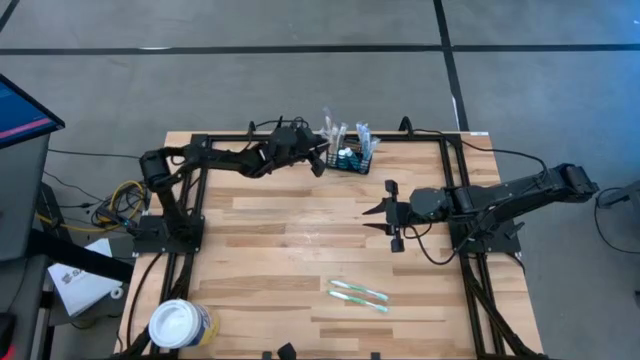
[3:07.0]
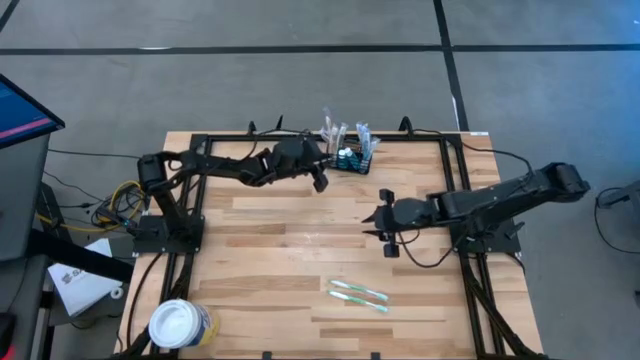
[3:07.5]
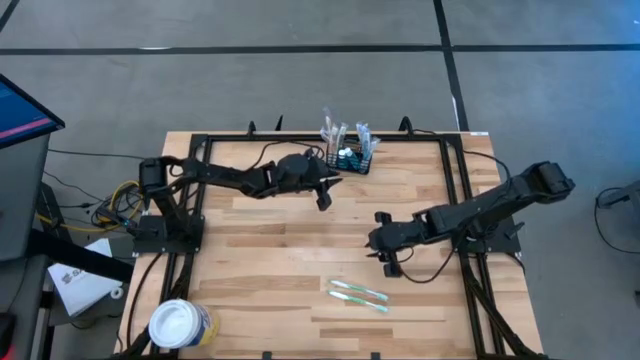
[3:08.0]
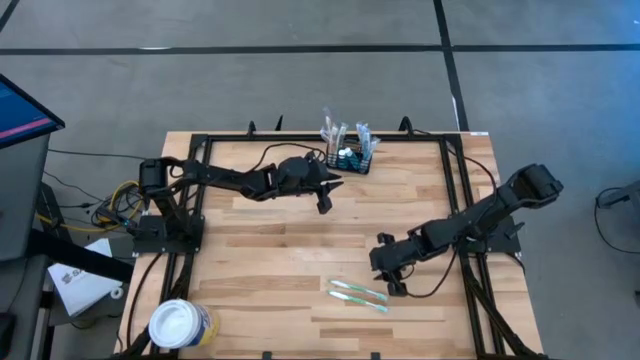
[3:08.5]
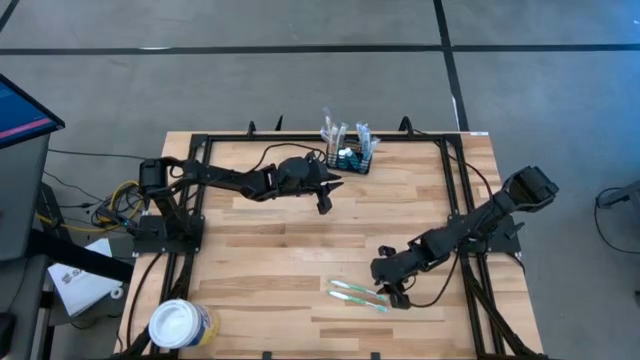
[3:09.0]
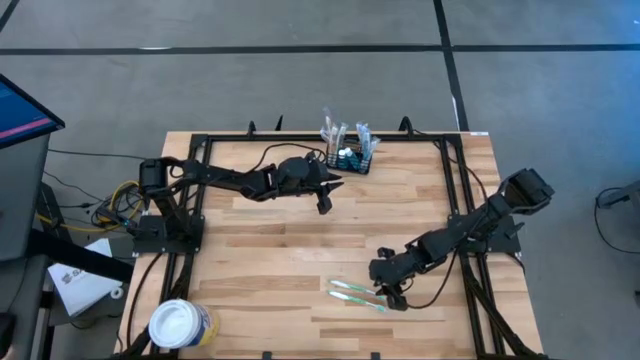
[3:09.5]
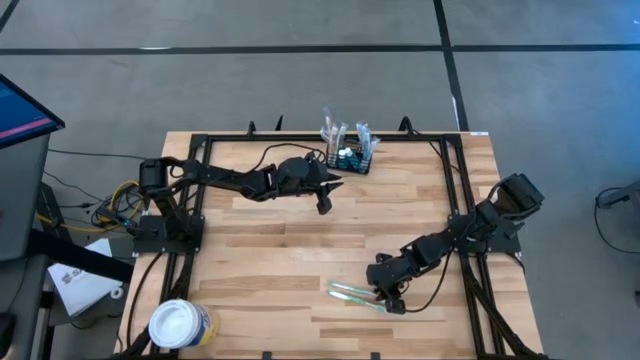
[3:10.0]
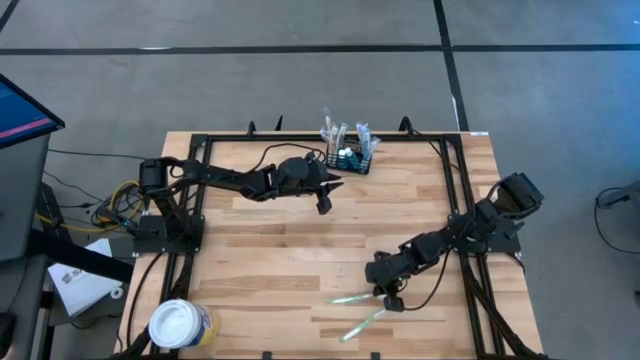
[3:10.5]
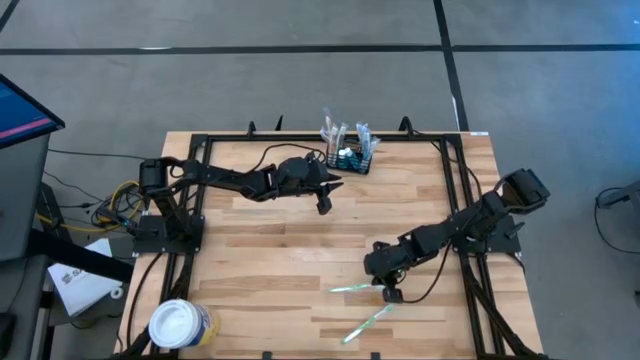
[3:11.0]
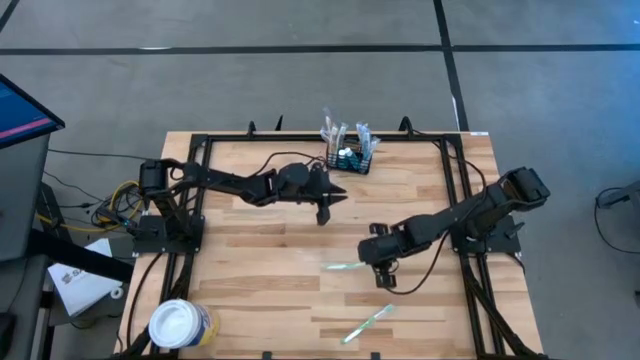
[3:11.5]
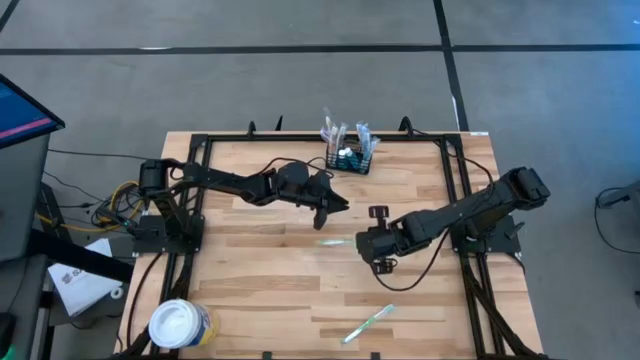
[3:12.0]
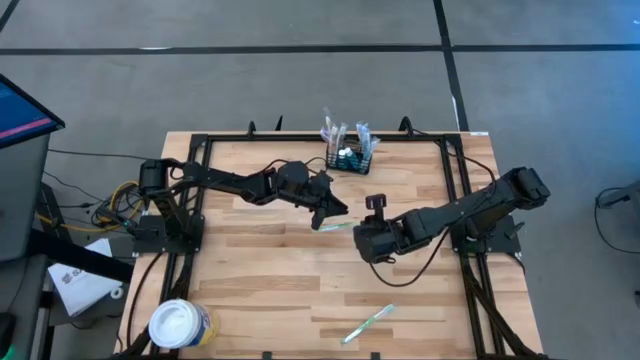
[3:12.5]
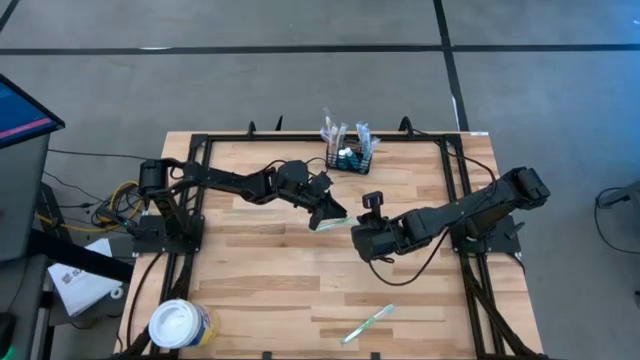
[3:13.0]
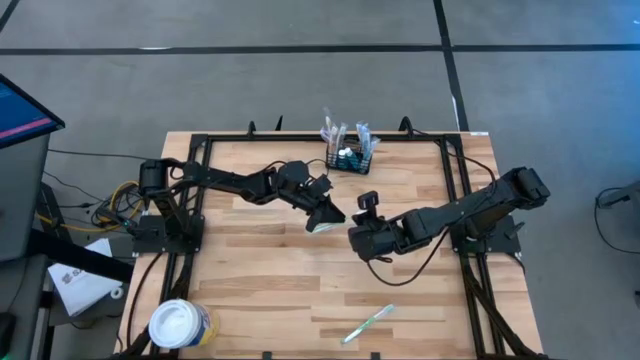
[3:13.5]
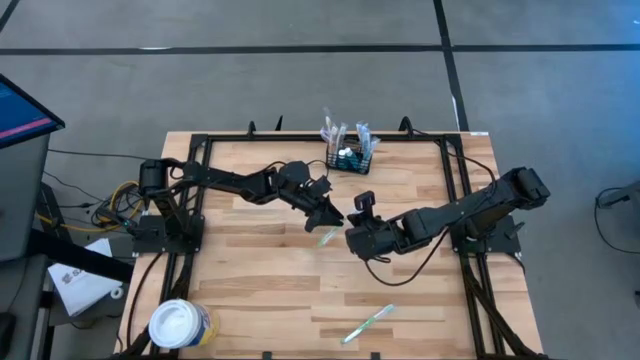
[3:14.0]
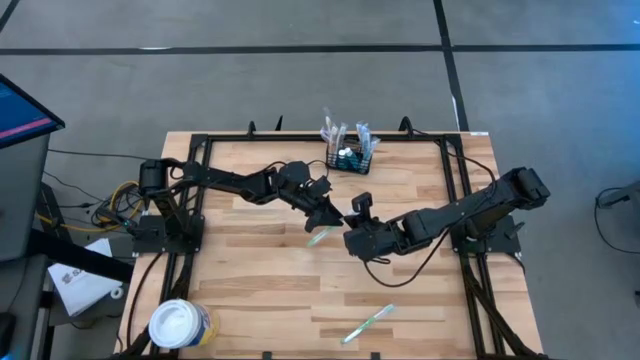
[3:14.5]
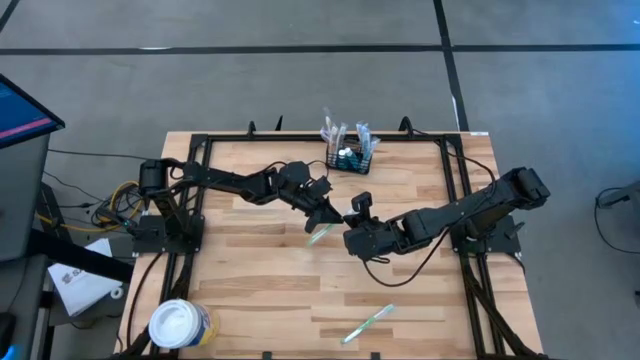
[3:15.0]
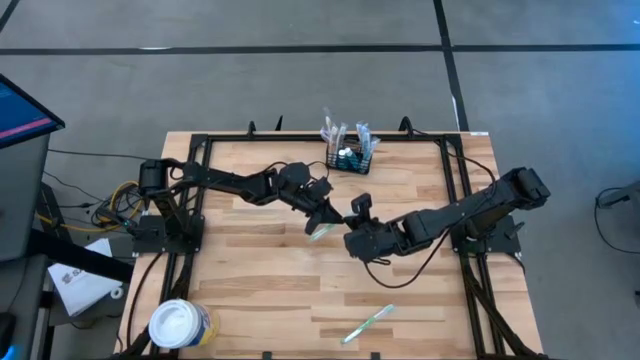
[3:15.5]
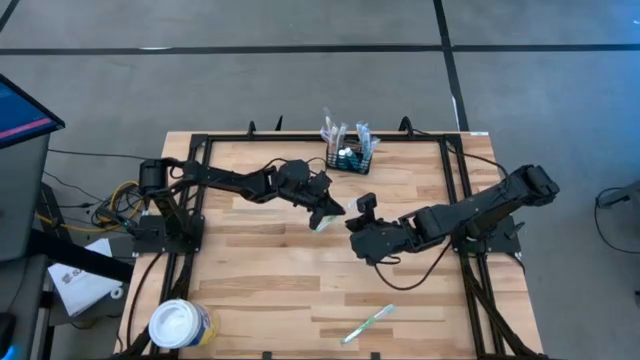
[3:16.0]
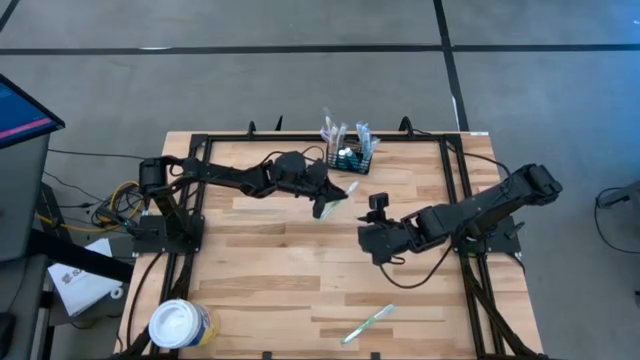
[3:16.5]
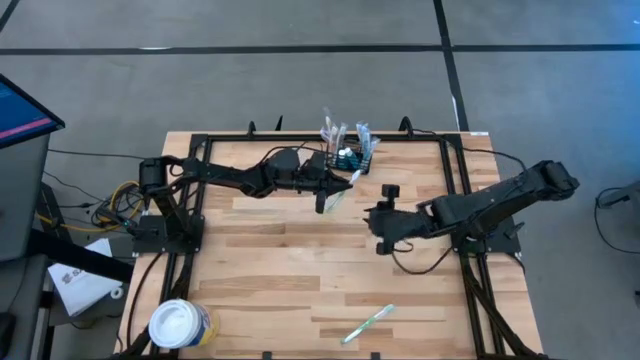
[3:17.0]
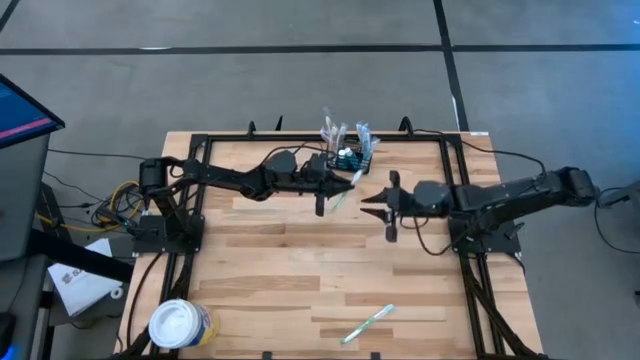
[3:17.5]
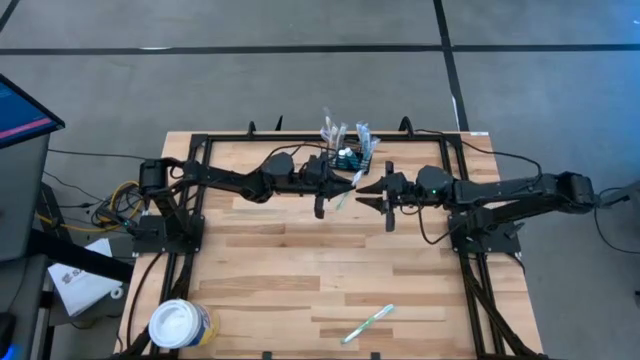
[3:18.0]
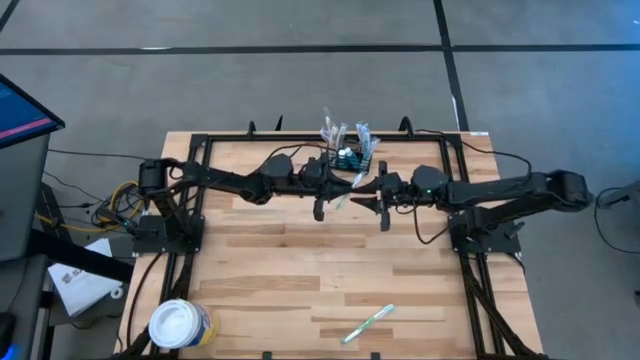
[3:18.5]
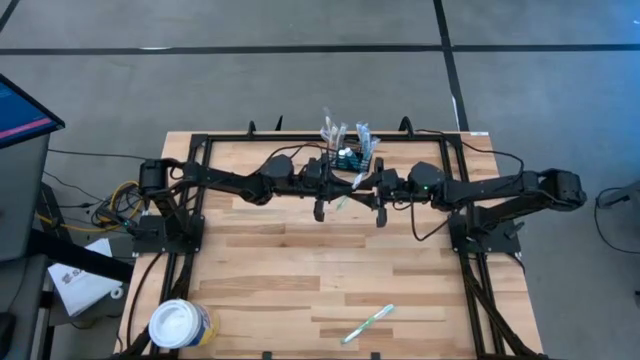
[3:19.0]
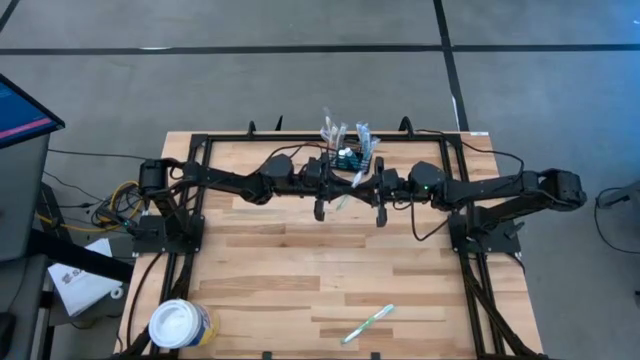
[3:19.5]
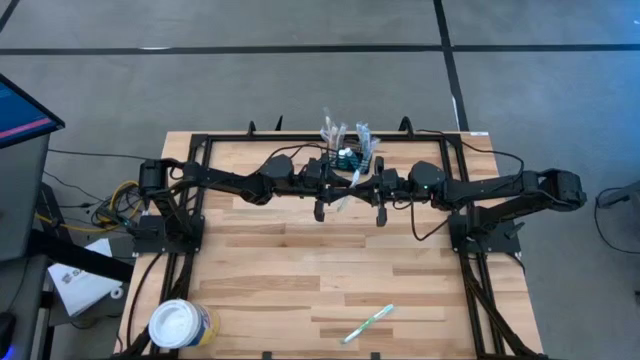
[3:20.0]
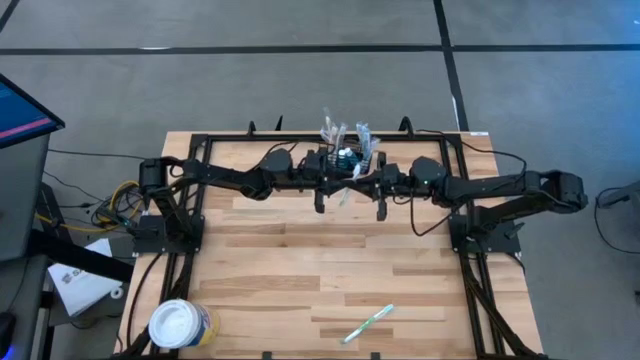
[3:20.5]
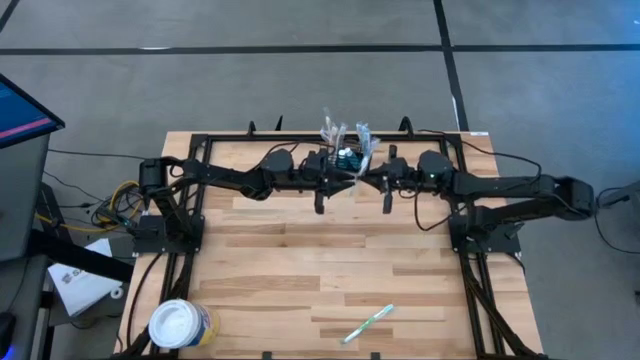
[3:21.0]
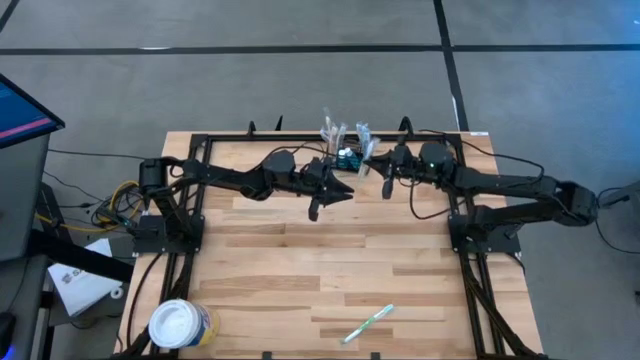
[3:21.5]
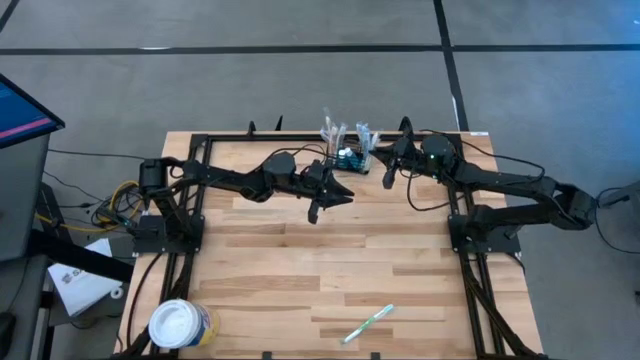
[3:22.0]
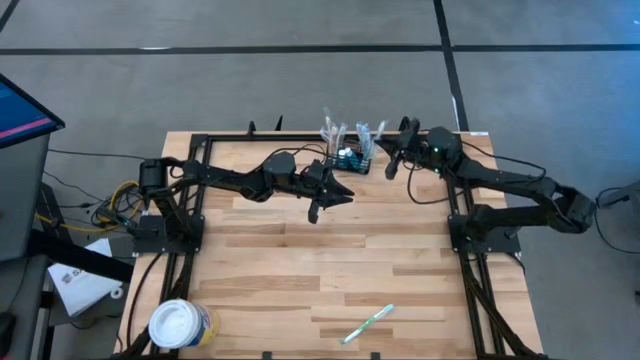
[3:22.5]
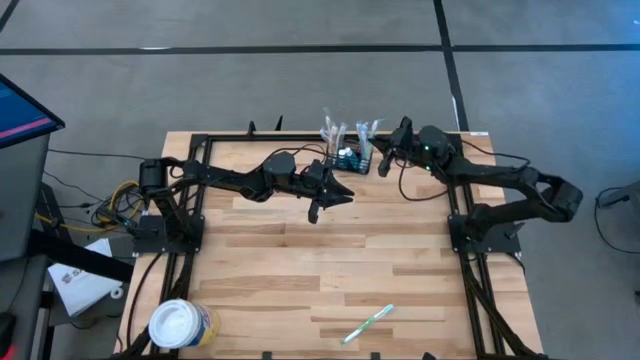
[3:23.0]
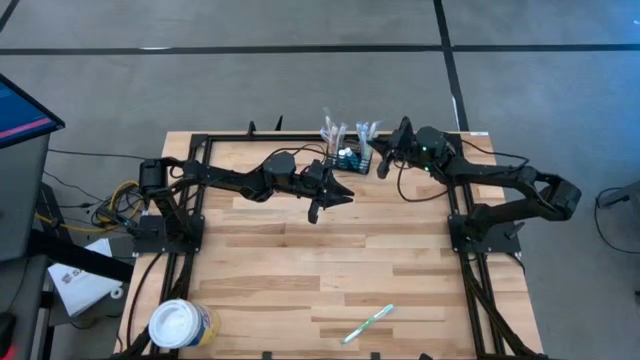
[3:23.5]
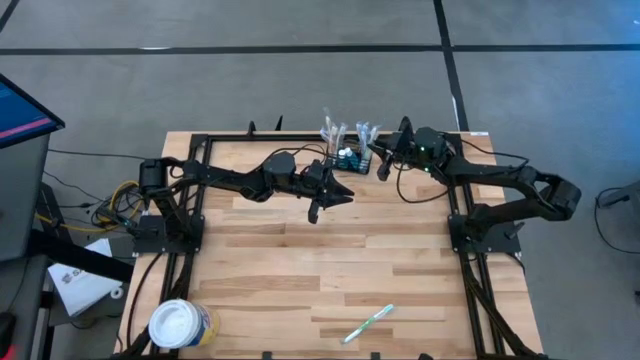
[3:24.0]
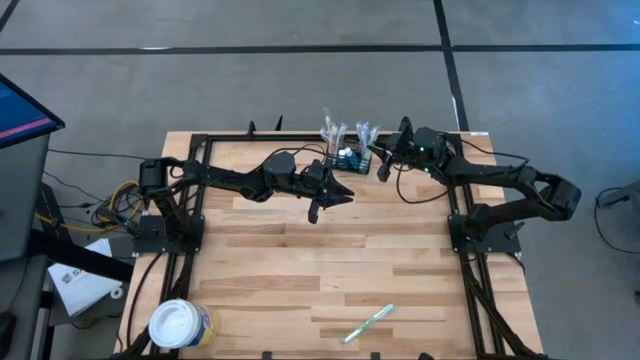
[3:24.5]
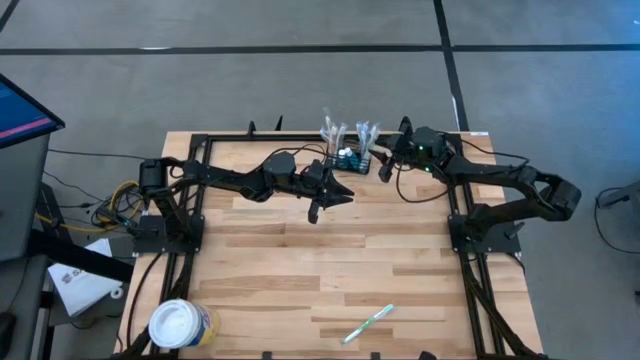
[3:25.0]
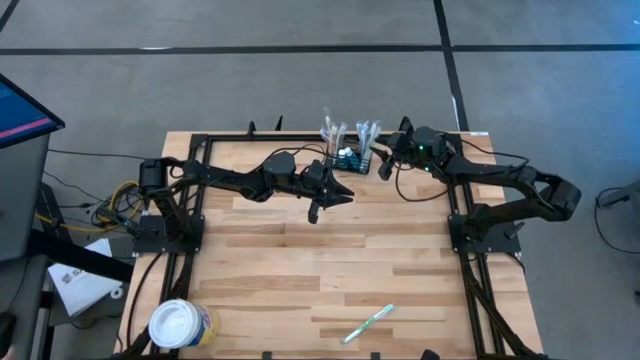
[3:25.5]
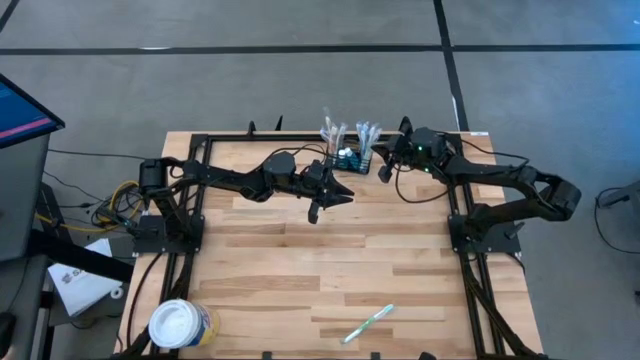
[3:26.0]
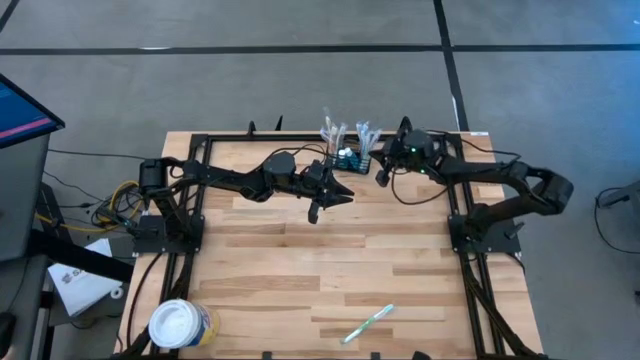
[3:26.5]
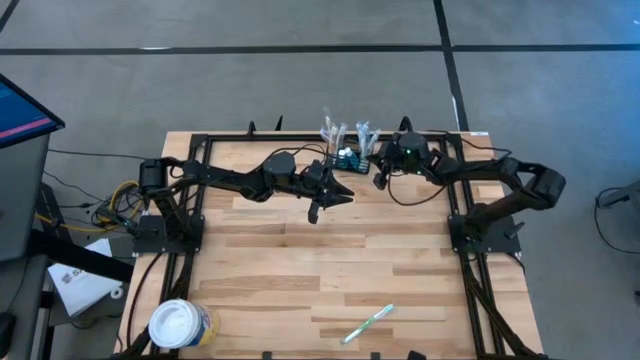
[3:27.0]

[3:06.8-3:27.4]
Task: Pick & Place toothbrushing station
Put the green toothbrush into the mesh organizer

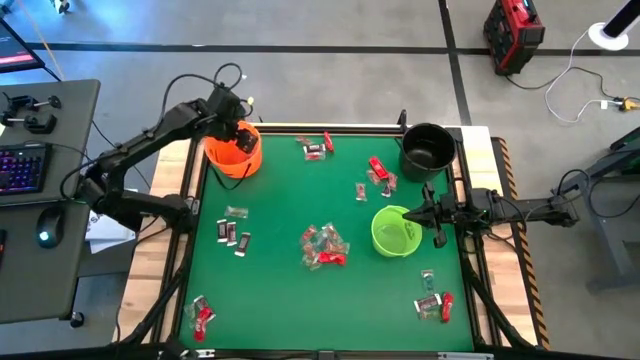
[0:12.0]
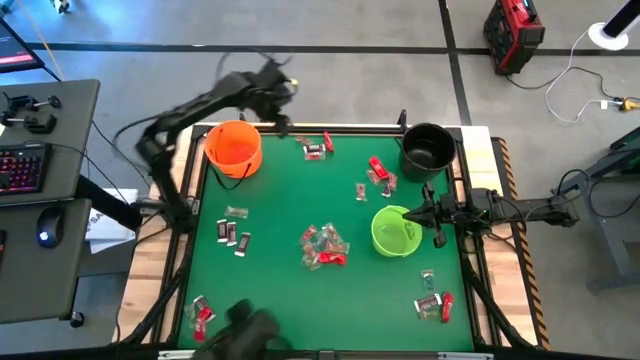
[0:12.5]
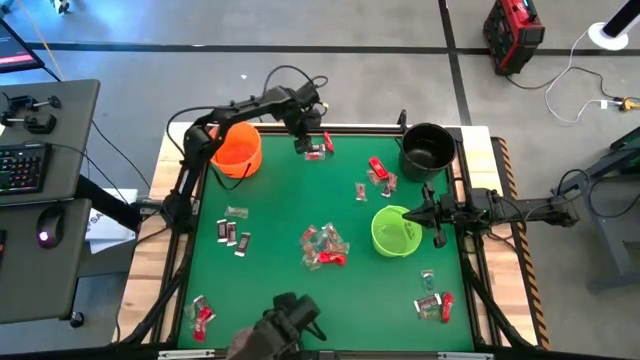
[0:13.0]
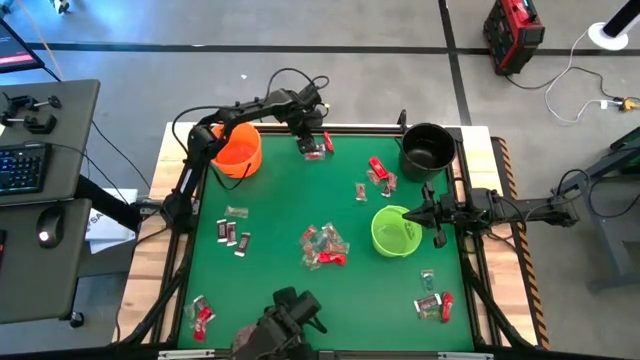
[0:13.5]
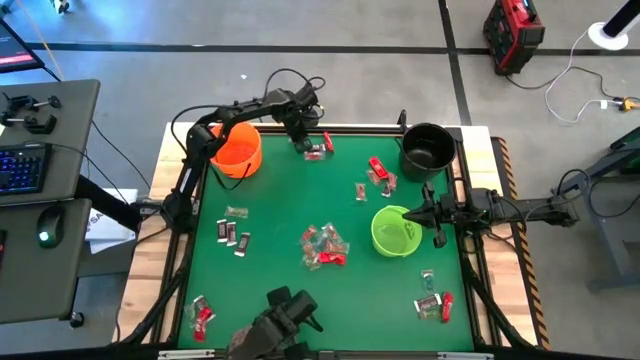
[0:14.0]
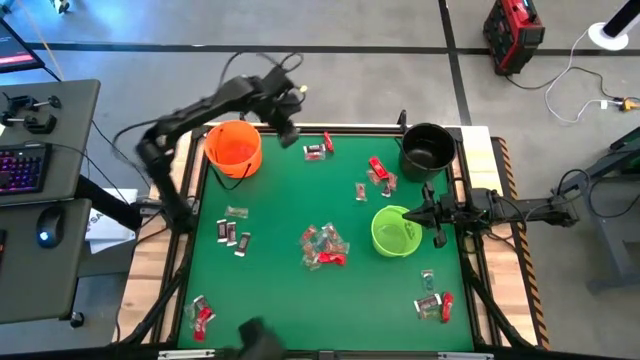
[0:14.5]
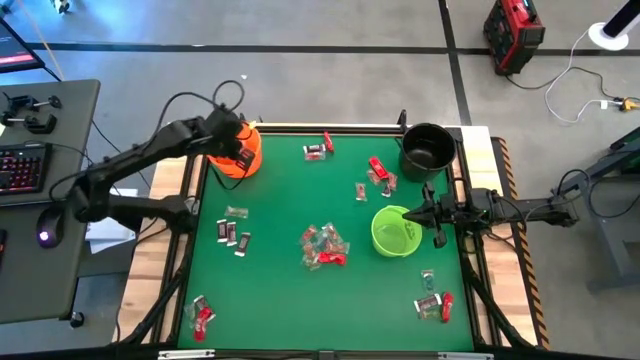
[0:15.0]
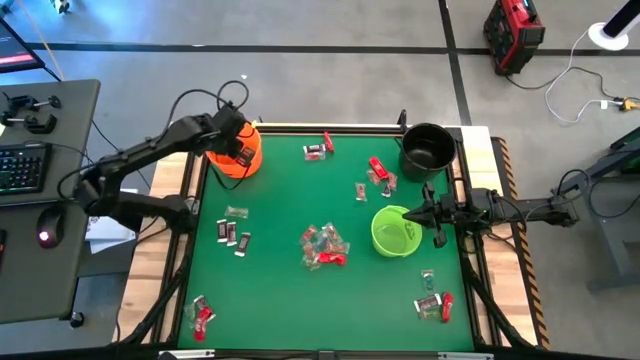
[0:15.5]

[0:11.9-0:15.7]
Task: Sort candy by brand, put in halloween buckets
Put the orange gummy into the orange bucket
